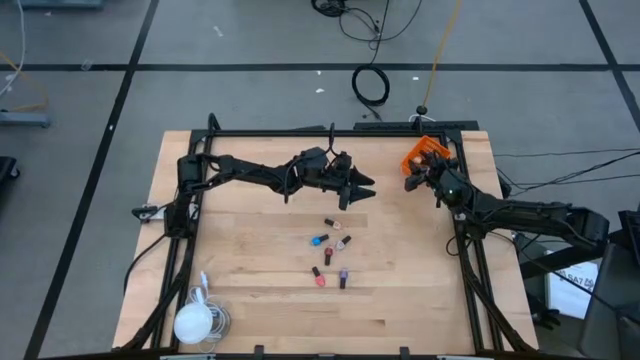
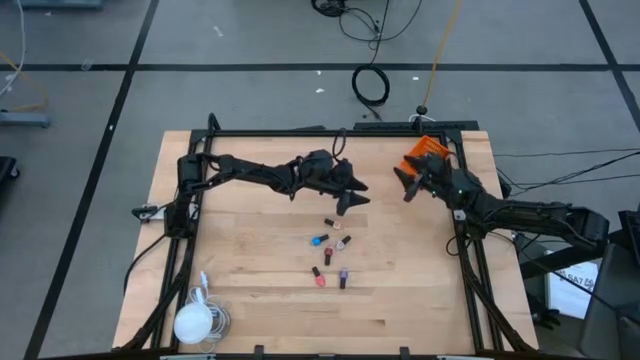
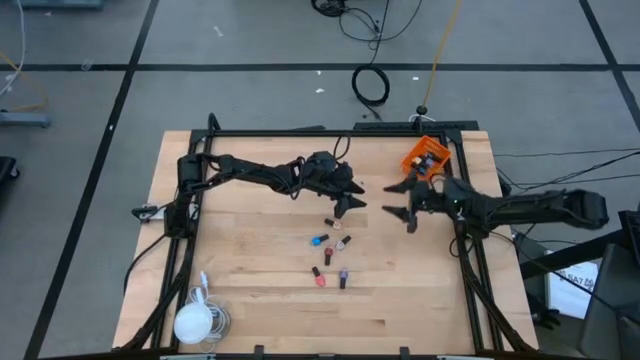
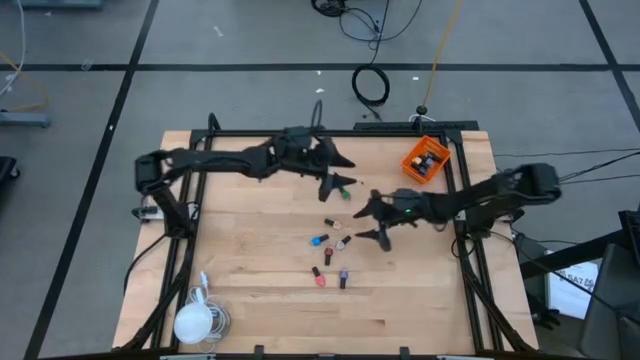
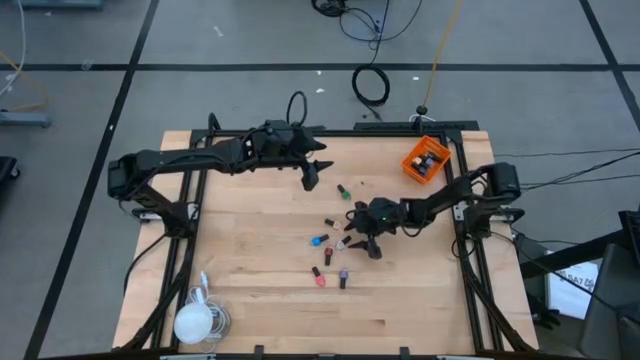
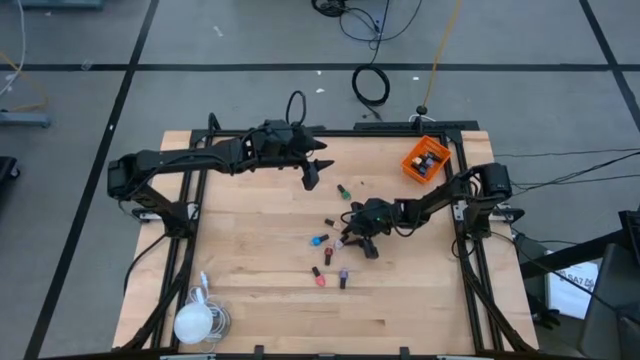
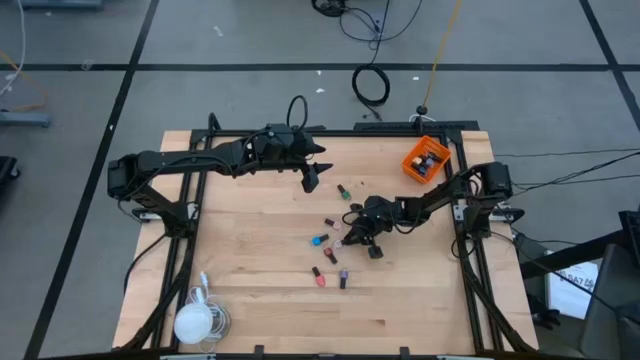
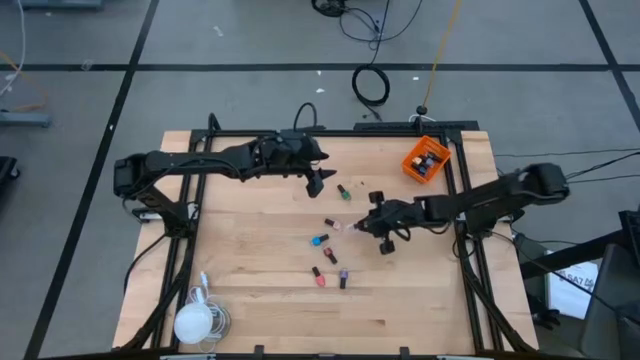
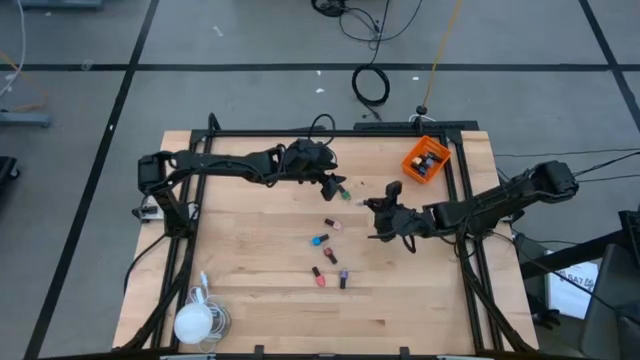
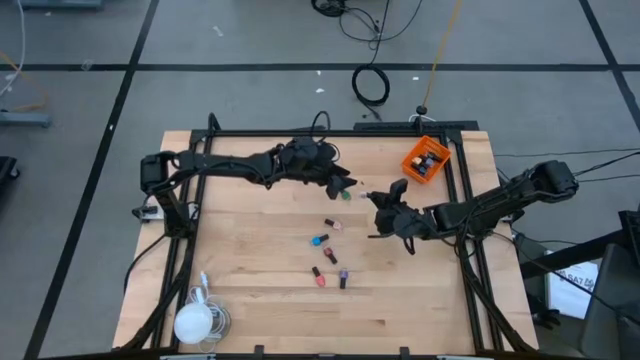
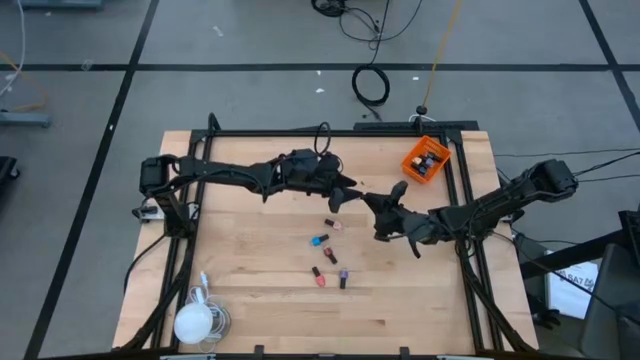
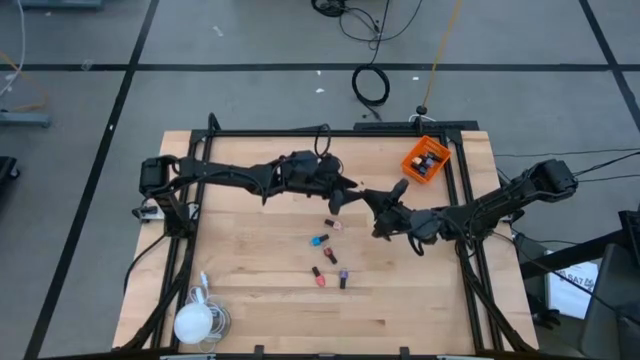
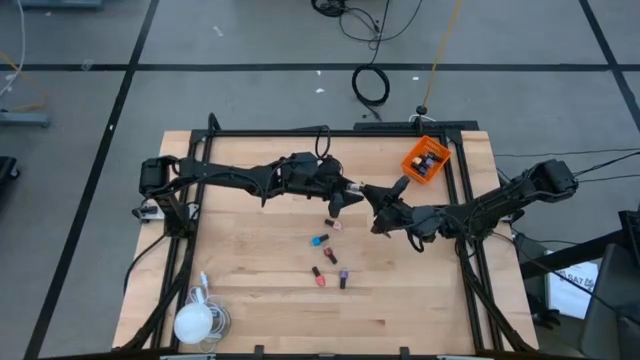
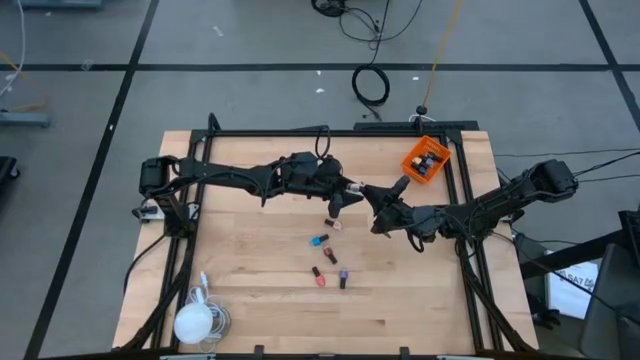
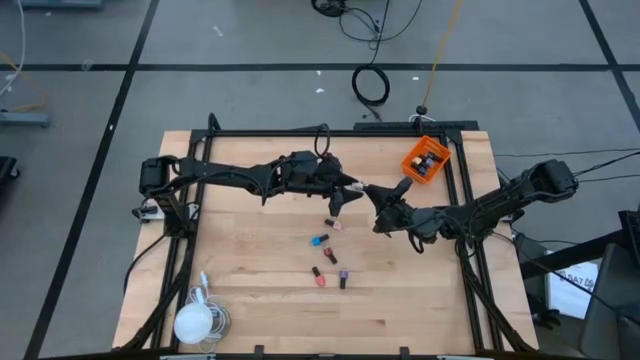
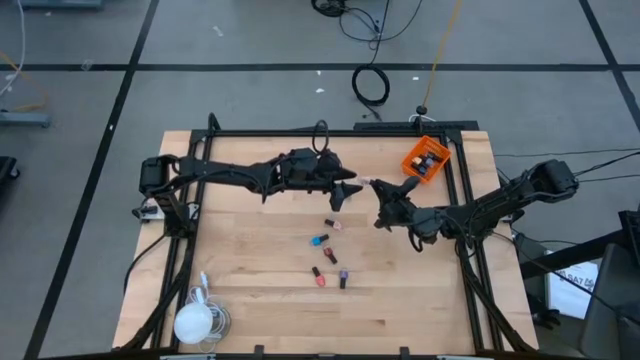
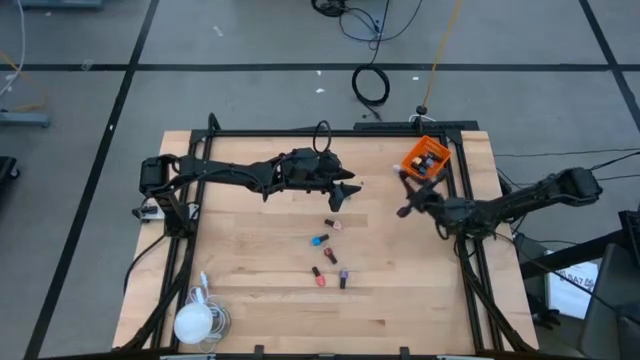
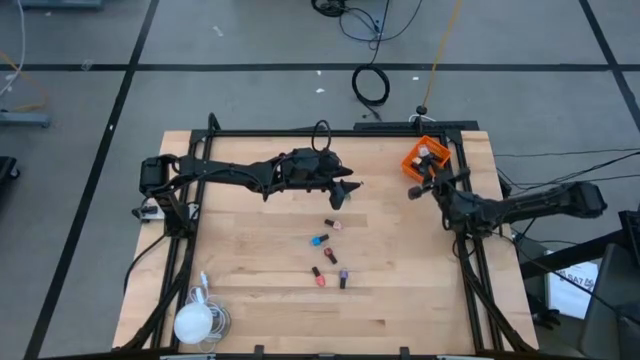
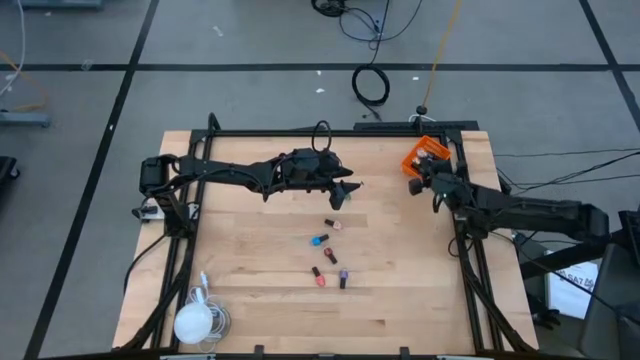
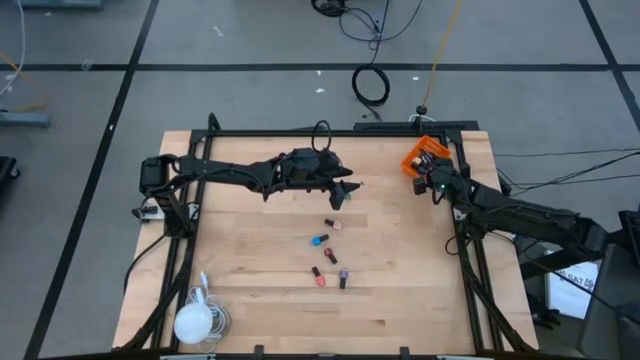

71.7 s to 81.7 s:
Task: Pick & Place Nail Polish
Put the white nail polish bottle into the orange basket

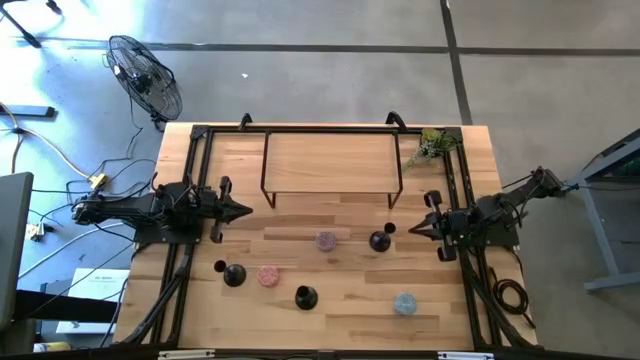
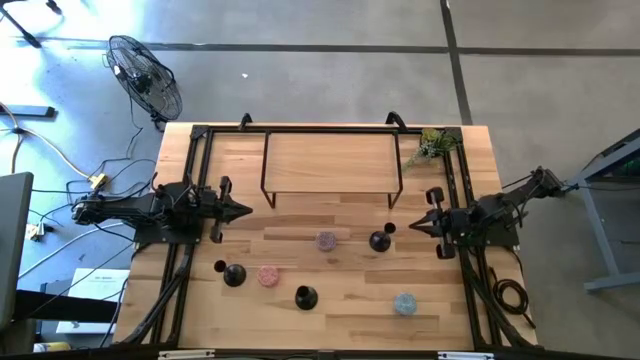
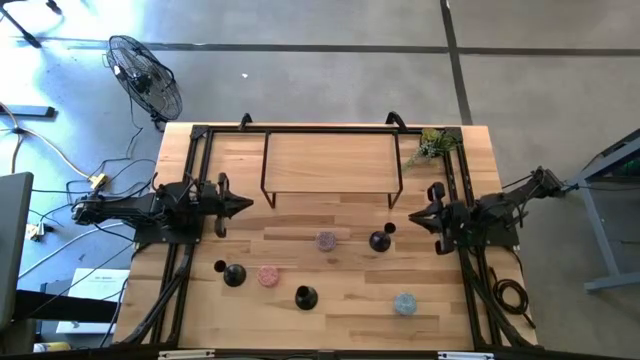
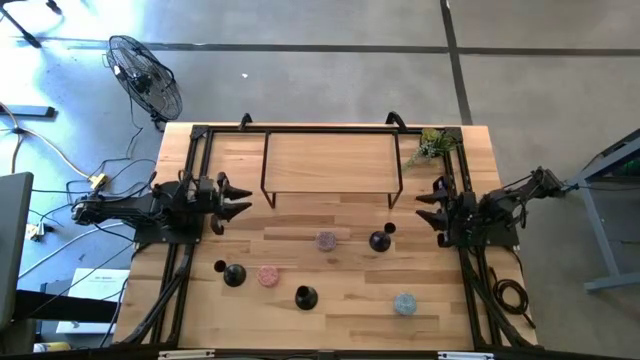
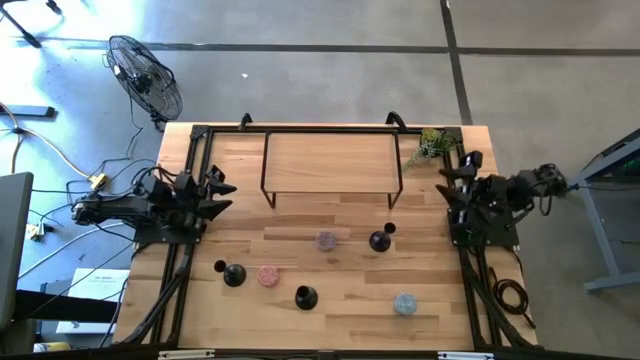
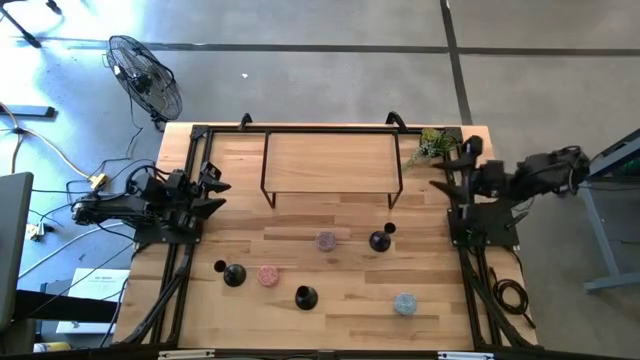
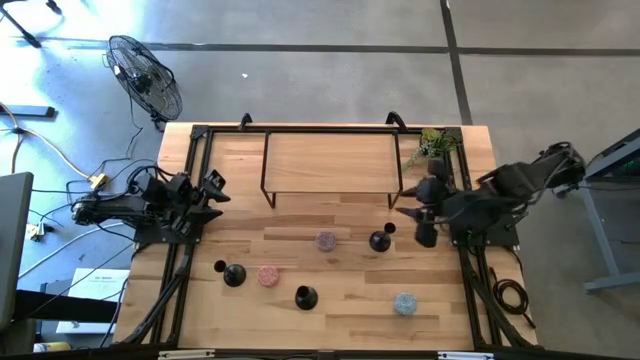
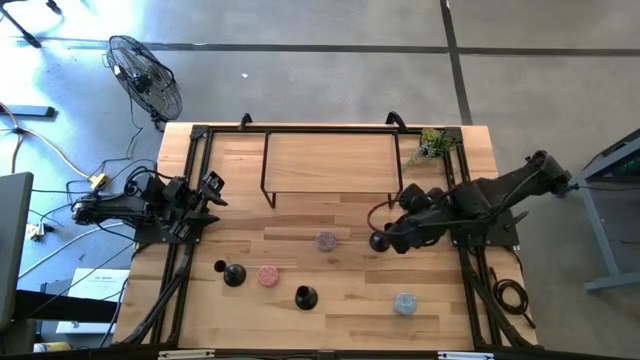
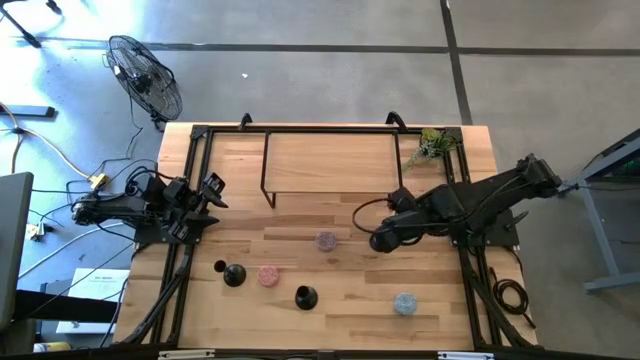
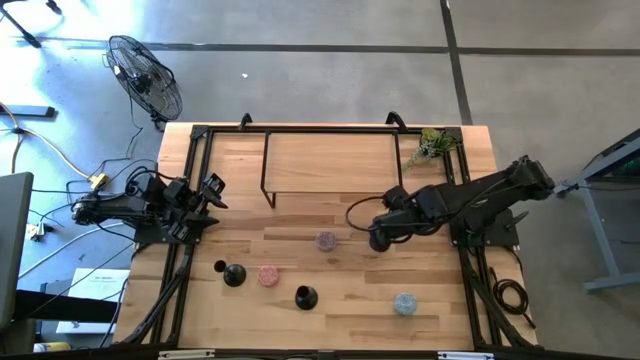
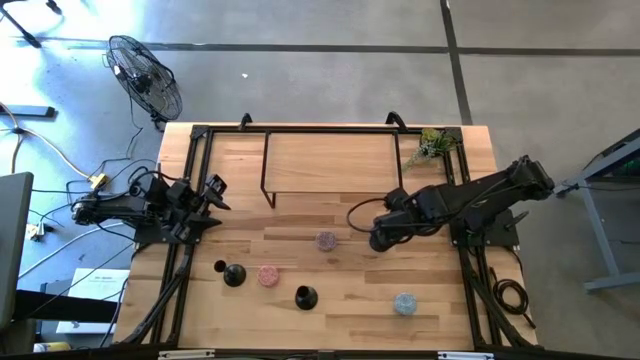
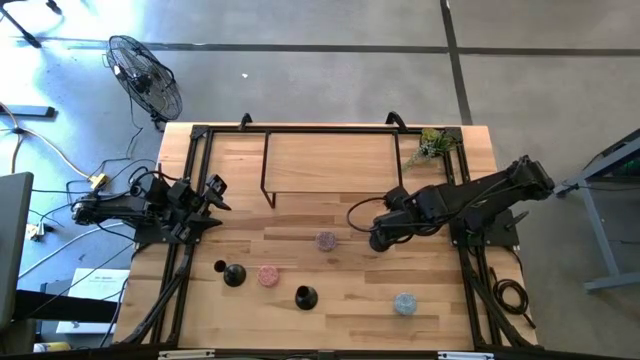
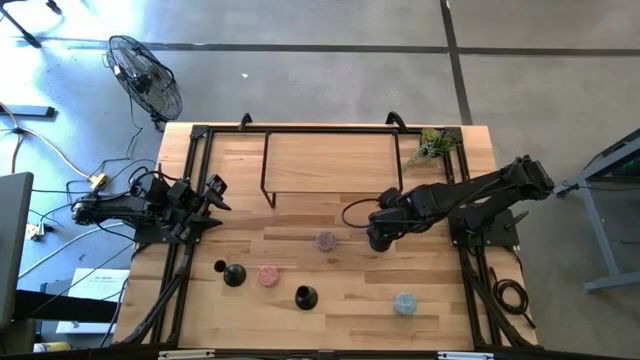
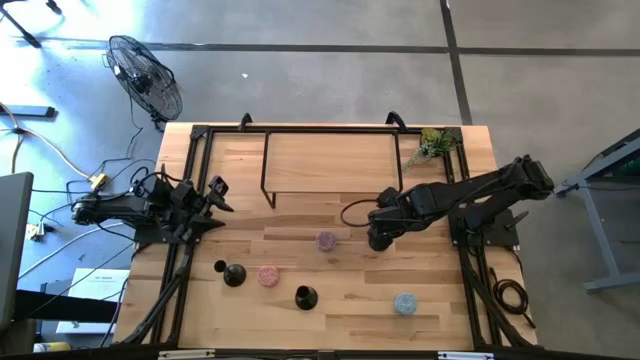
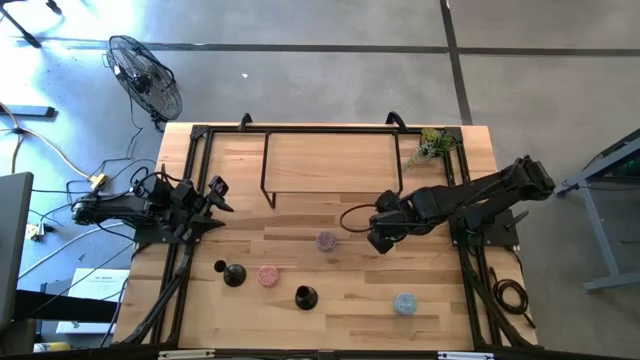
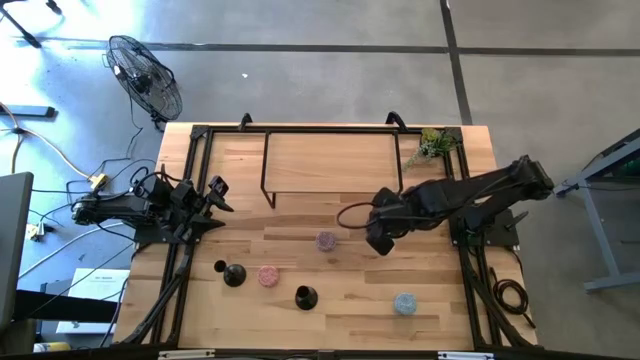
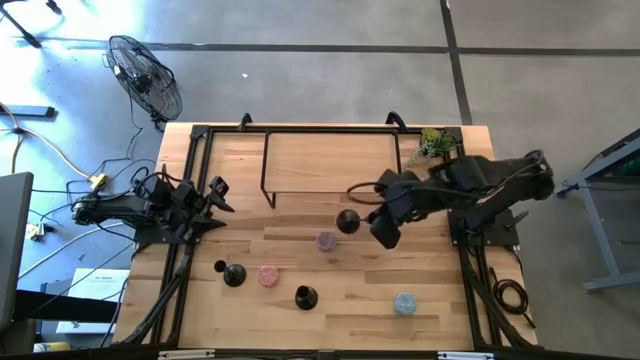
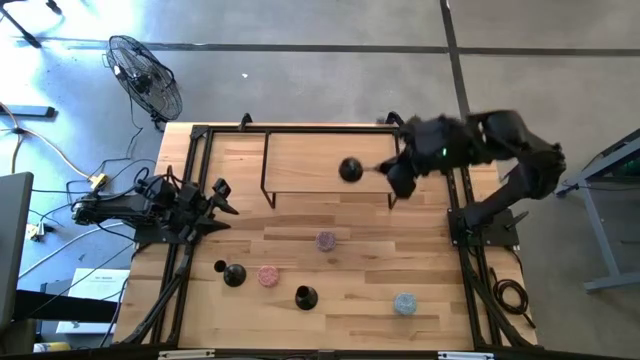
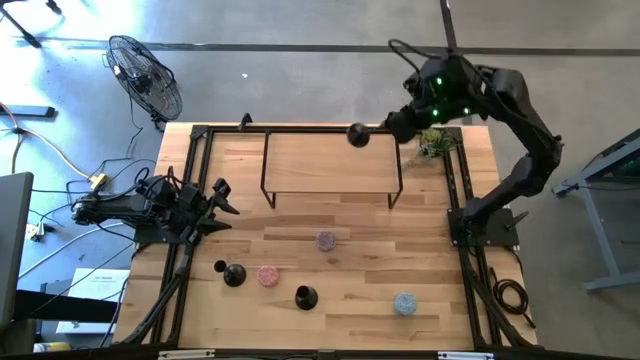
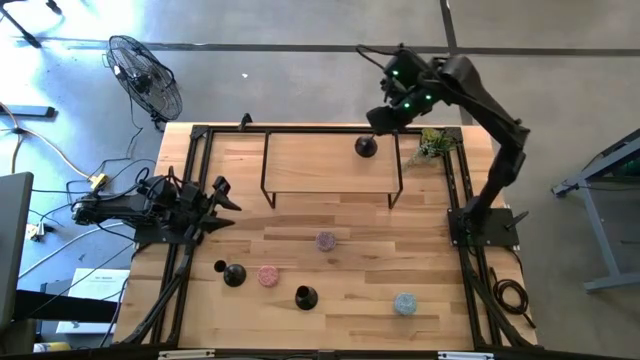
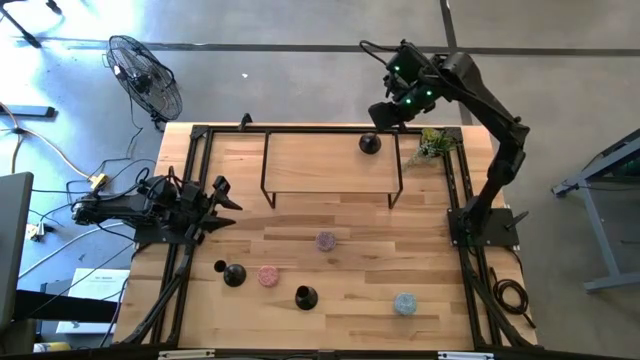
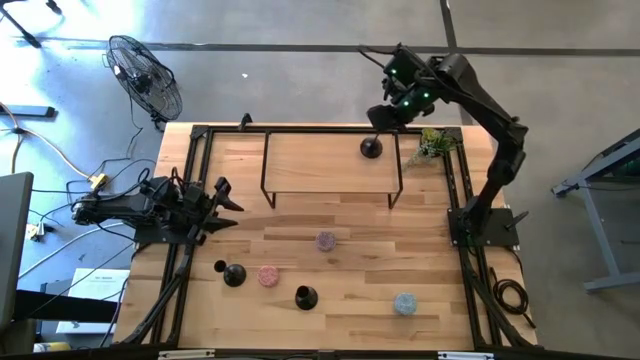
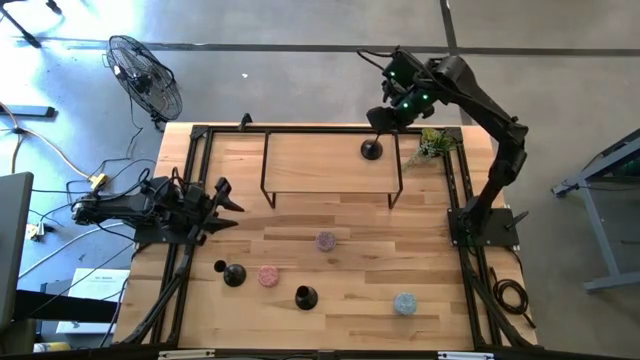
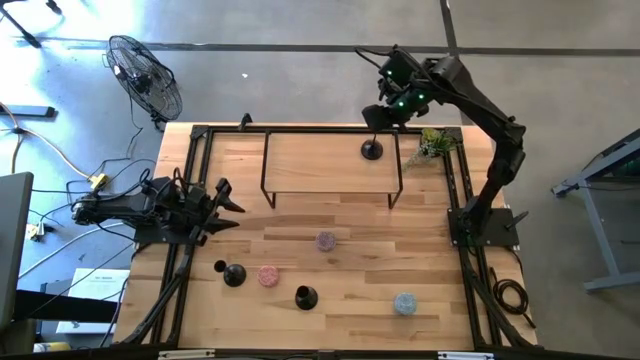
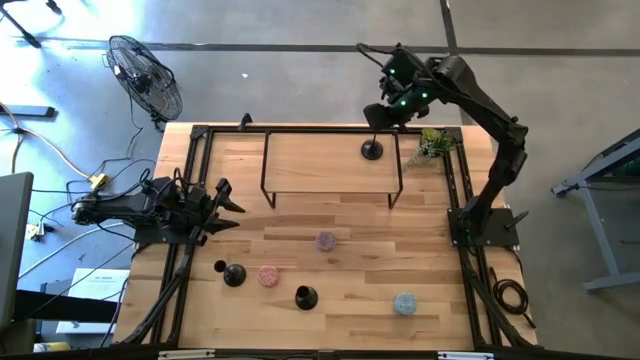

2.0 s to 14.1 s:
Task: Pick & Place candle stick holders
Put the top black candle holder on the shelf
